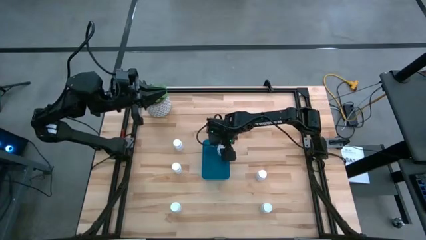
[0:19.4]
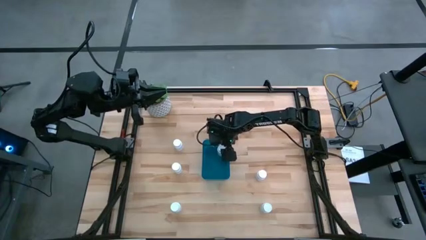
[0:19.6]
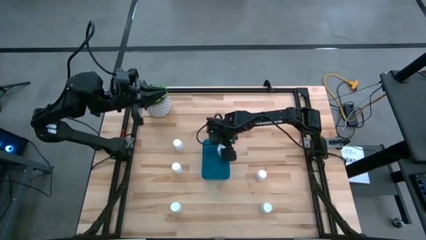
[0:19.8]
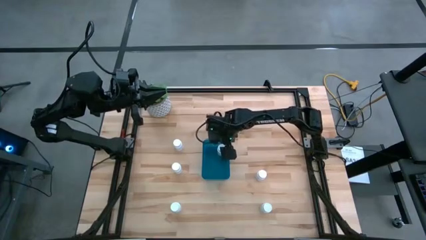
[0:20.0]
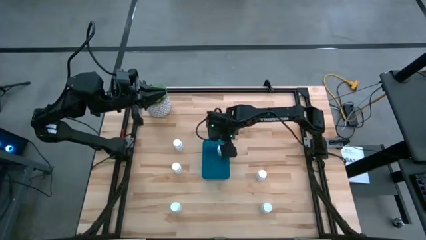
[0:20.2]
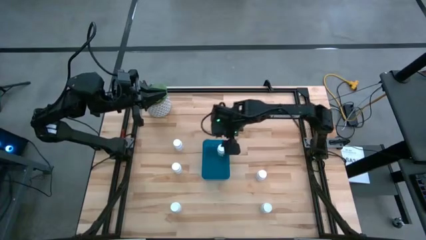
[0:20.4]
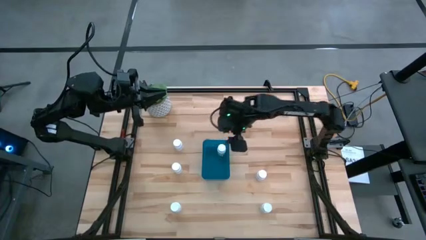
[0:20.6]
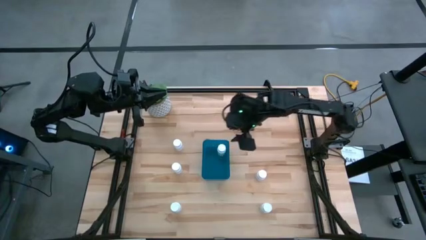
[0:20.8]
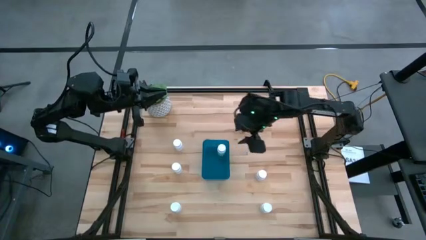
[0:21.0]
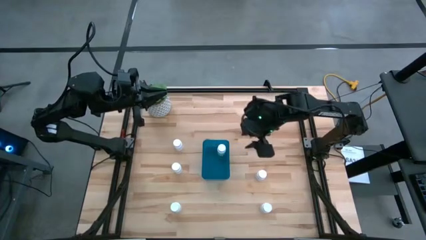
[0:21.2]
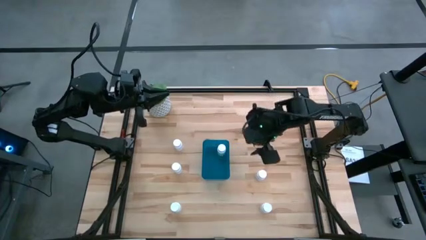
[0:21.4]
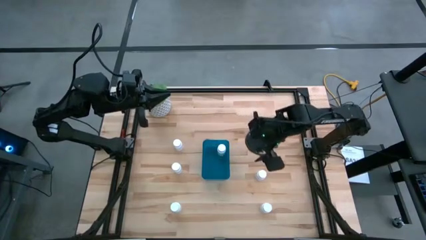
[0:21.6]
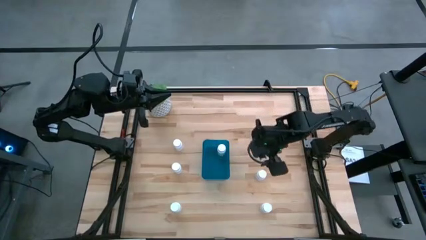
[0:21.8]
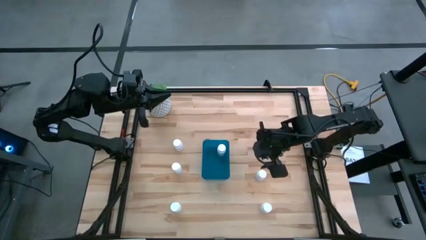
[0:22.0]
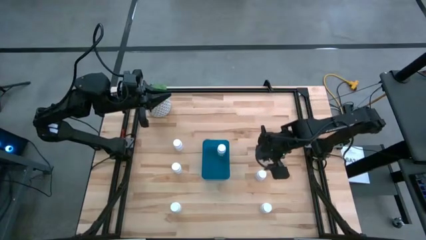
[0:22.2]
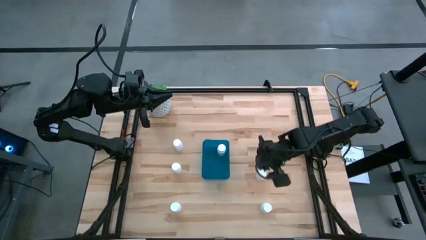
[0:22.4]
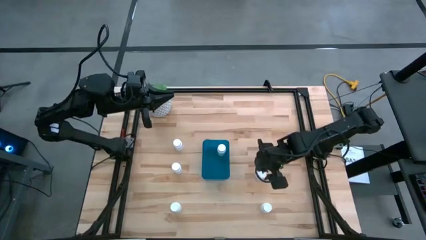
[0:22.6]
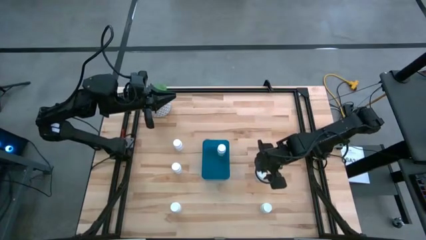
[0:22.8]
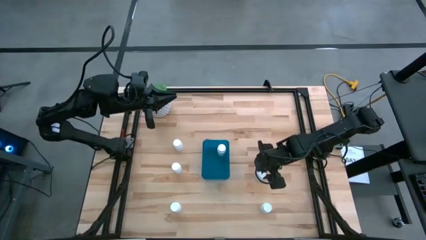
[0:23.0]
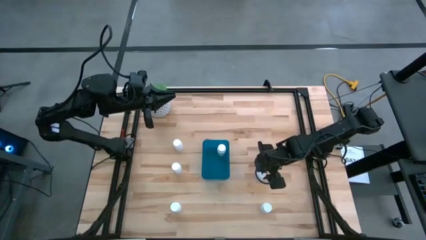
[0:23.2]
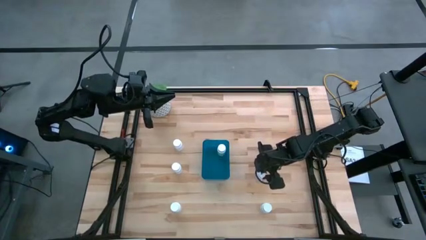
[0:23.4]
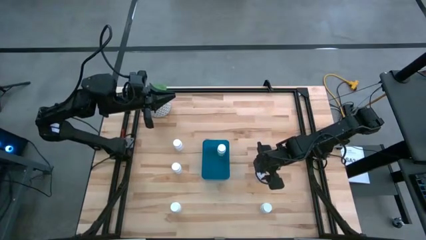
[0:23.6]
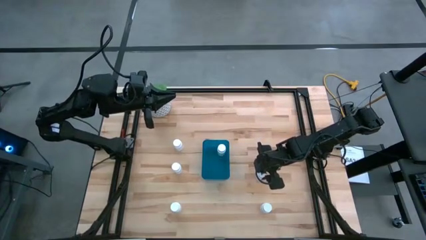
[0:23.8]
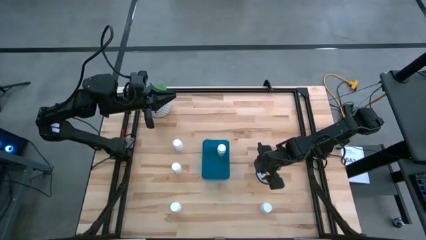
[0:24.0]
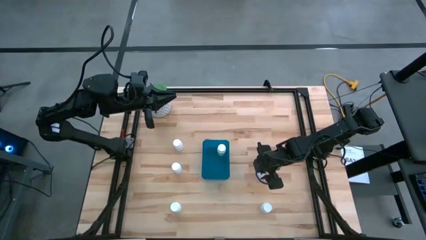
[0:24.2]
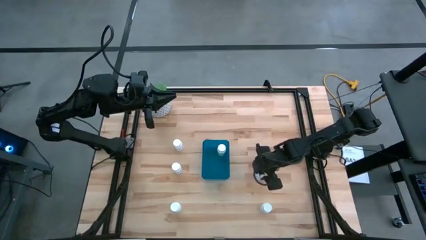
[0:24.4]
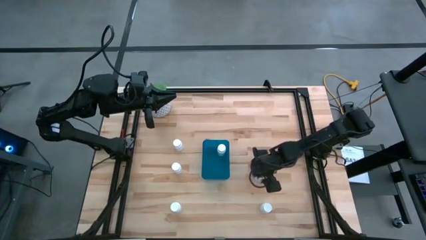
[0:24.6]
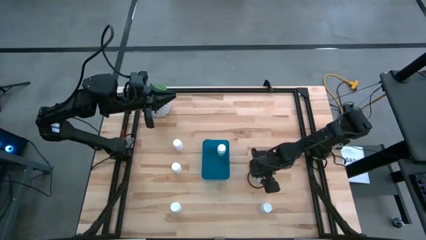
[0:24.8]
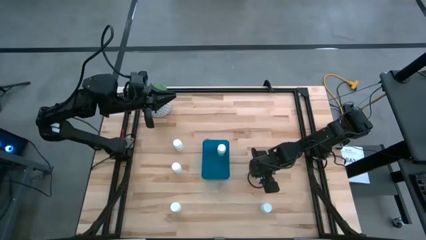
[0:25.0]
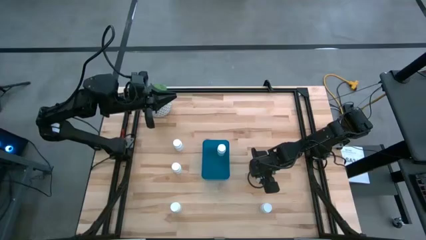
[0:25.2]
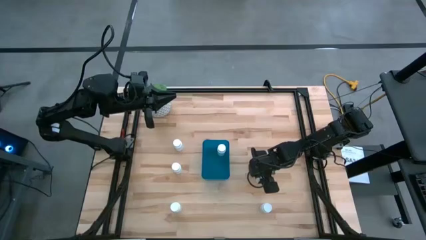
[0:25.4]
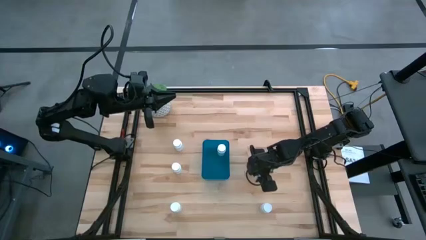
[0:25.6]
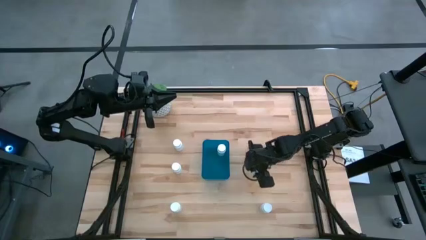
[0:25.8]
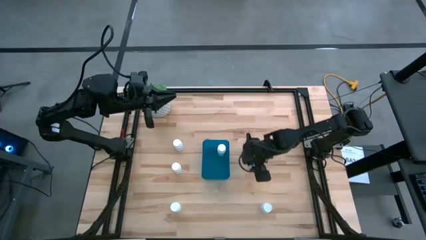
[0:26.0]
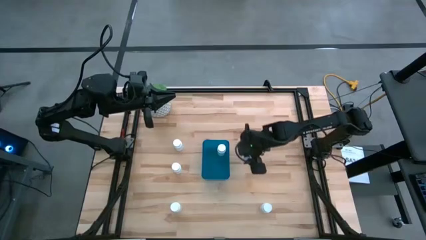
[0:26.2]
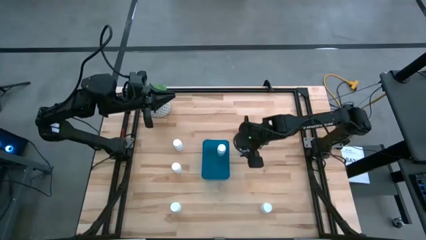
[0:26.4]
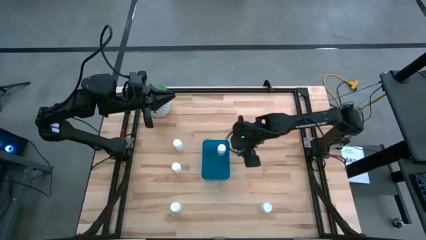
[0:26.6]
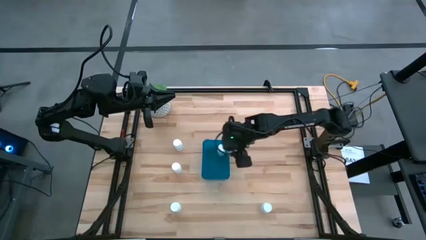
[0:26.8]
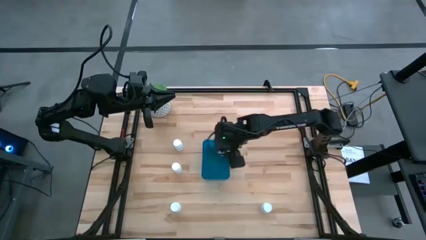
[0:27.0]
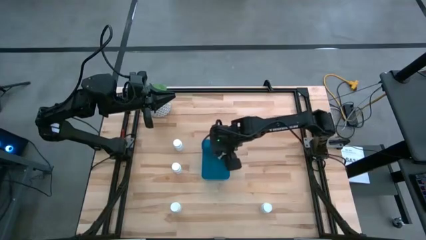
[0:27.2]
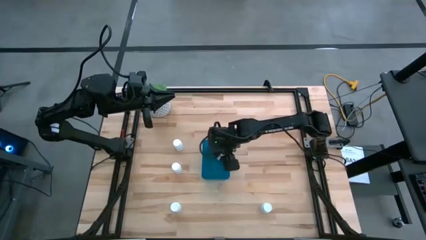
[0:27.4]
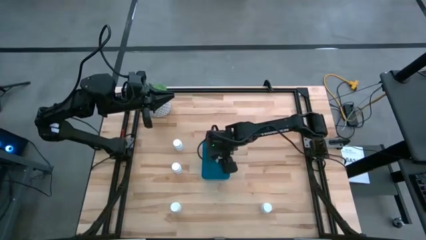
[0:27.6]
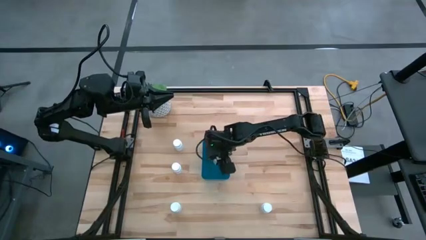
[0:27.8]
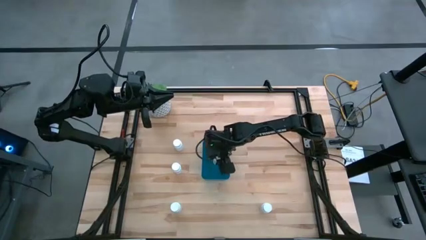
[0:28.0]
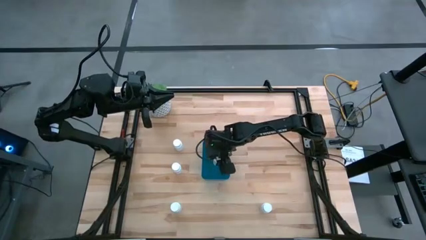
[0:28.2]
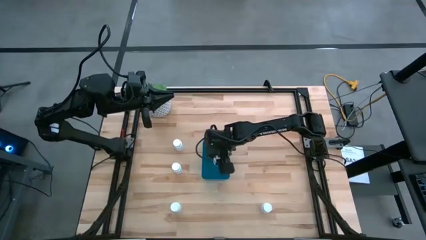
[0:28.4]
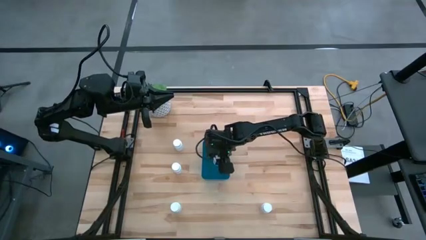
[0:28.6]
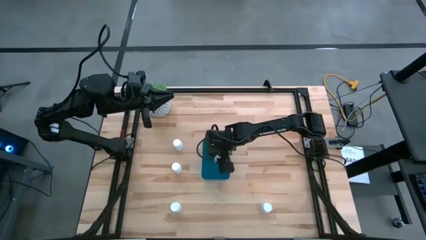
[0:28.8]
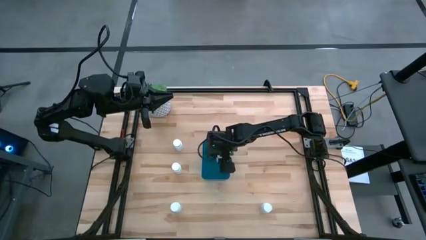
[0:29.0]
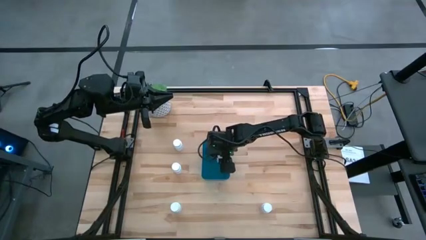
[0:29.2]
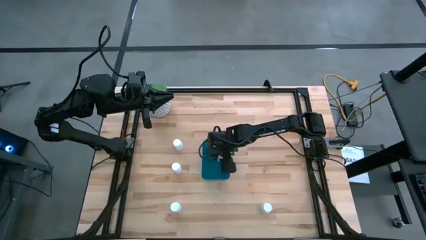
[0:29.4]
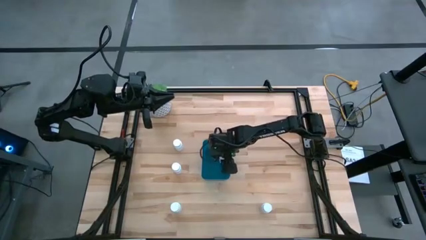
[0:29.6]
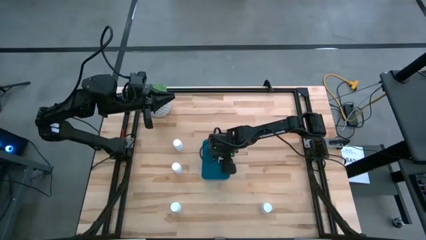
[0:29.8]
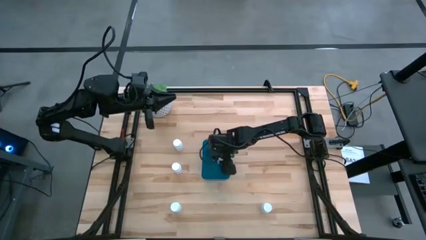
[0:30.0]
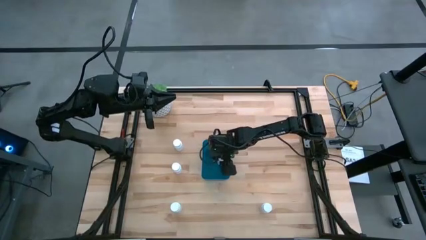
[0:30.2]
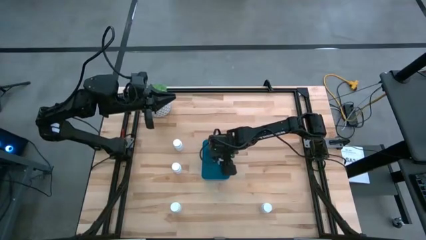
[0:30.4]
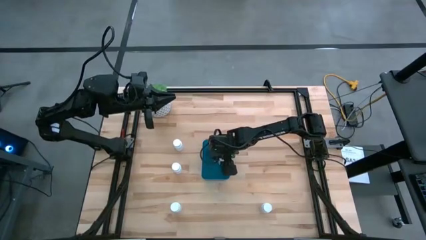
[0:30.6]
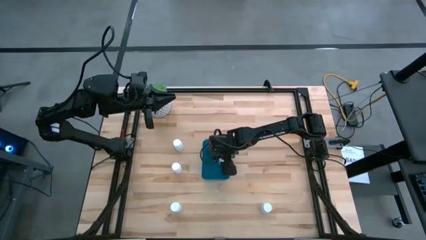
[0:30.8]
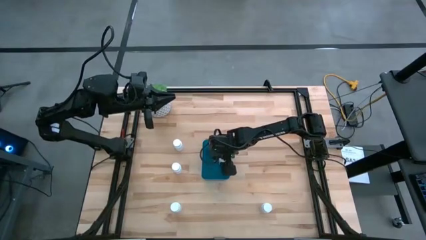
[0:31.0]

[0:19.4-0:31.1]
Task: Pick and place pill bottles into a basket
Put the white medicine bottle into the blue bin

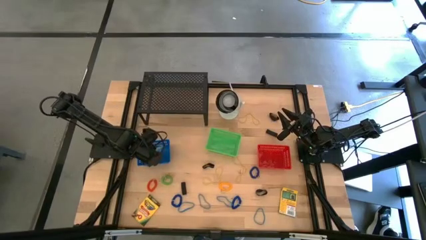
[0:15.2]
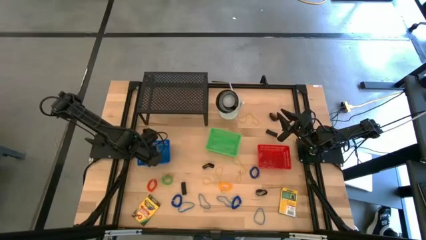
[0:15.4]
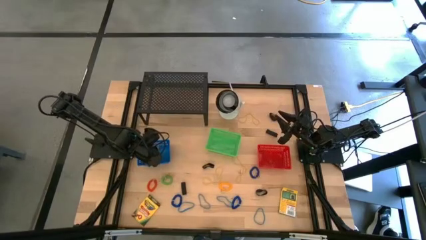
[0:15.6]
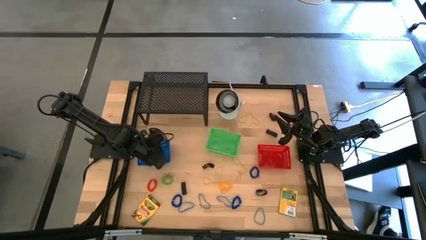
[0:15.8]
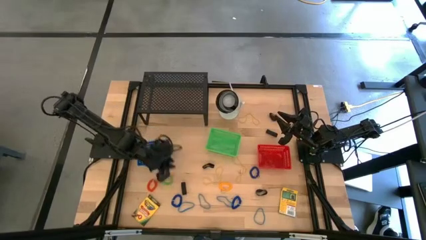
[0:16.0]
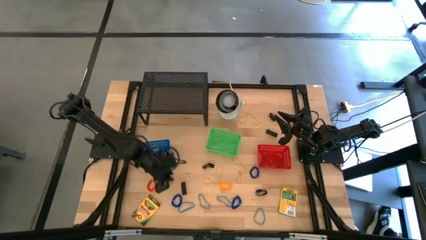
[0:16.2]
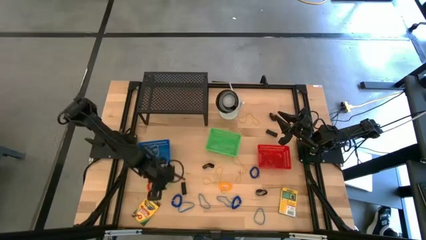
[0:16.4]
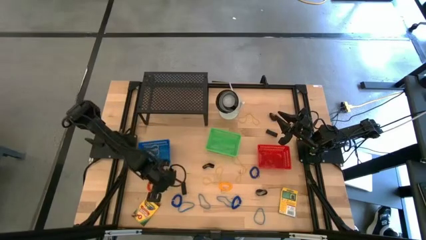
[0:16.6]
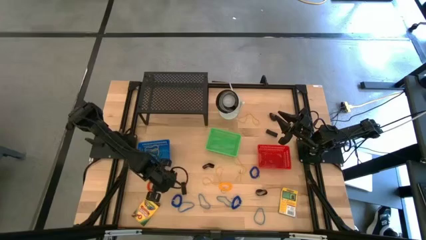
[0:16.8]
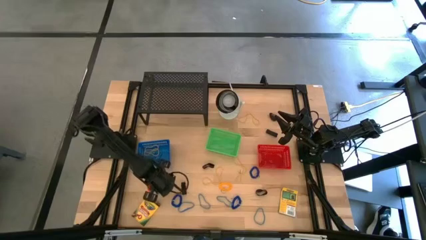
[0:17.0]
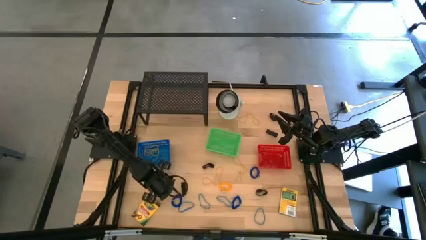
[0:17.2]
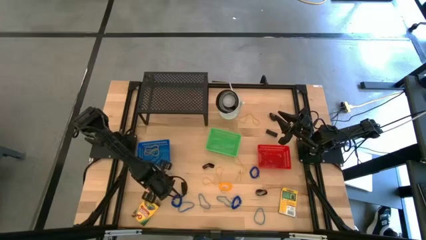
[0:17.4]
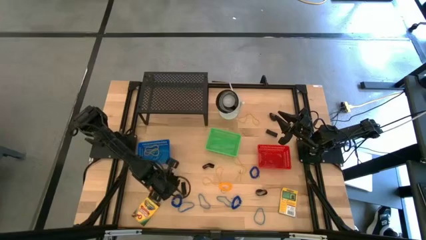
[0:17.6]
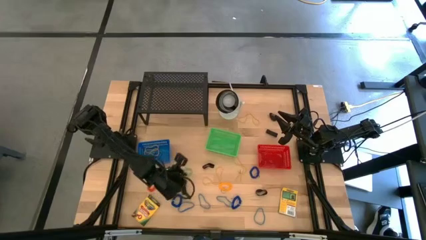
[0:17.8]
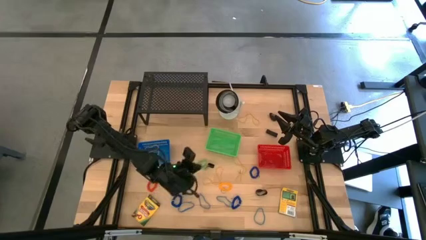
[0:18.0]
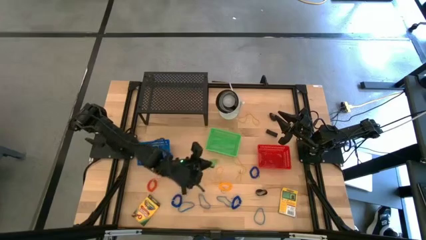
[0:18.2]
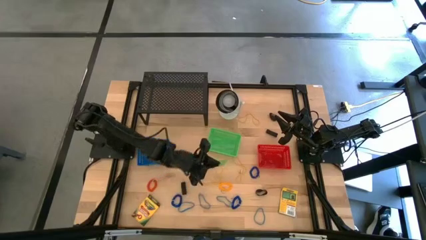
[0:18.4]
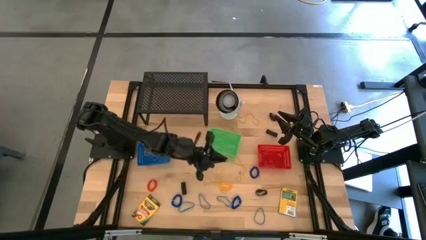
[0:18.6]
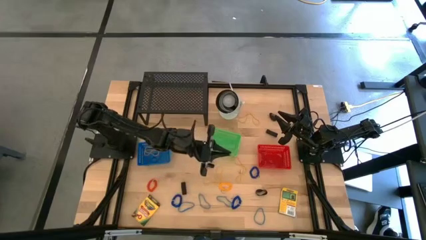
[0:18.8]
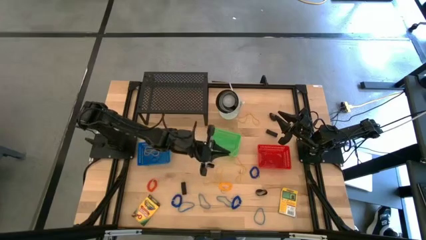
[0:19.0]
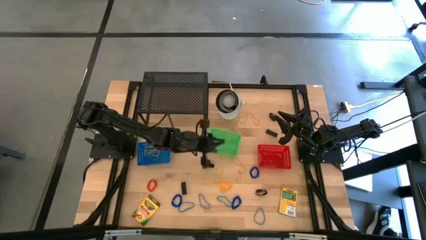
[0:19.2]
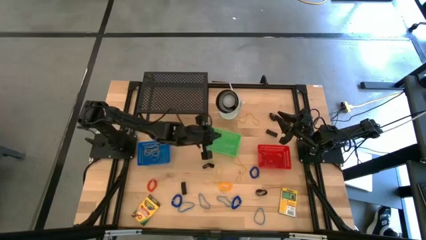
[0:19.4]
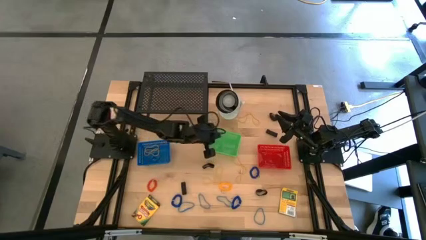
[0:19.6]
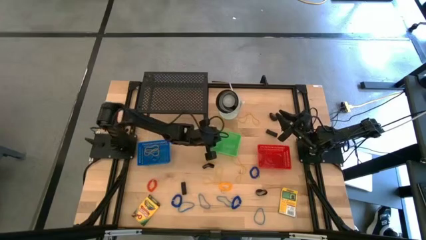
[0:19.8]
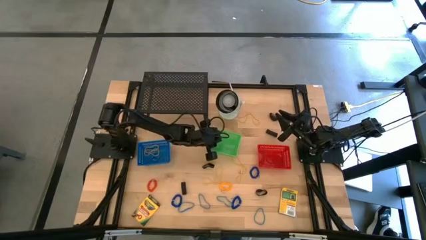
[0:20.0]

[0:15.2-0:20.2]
Task: Pick & Place Office Desk Supplies
Put the green spring keychain into the green bin
